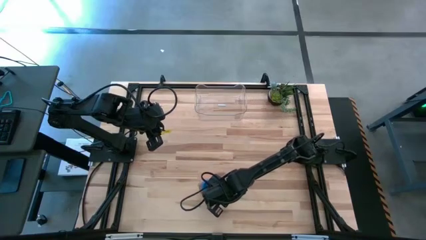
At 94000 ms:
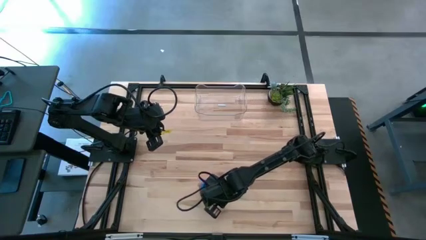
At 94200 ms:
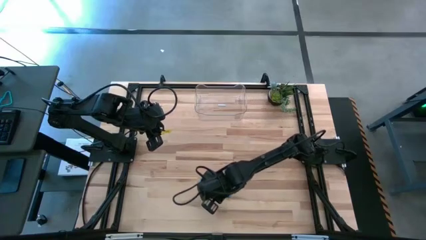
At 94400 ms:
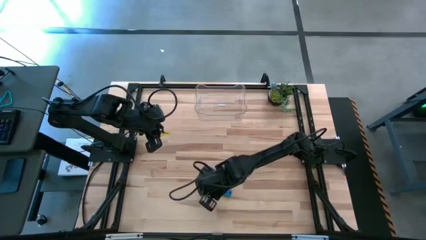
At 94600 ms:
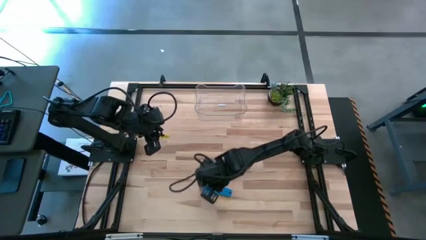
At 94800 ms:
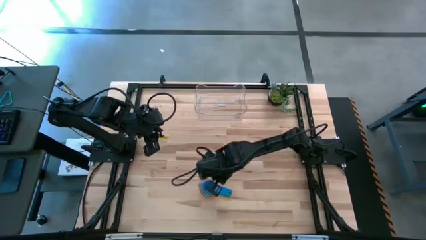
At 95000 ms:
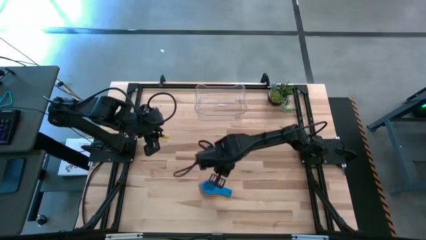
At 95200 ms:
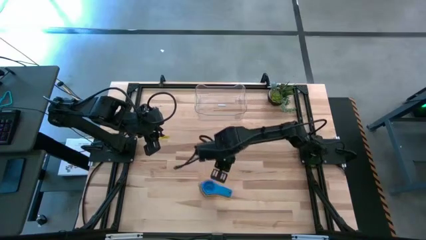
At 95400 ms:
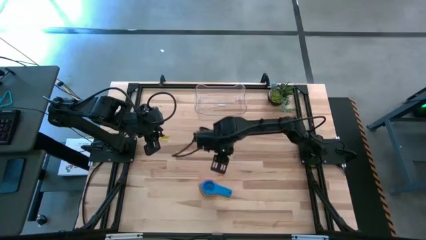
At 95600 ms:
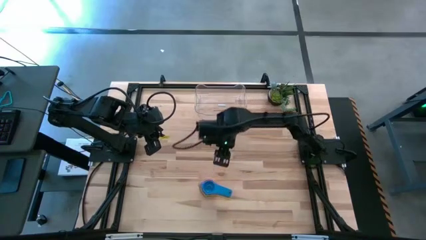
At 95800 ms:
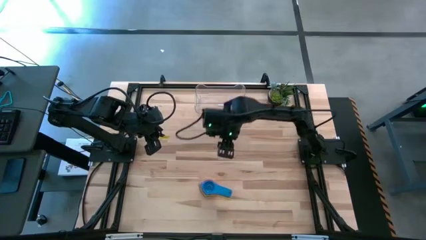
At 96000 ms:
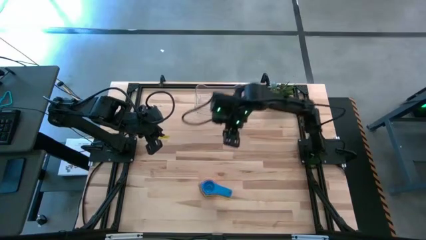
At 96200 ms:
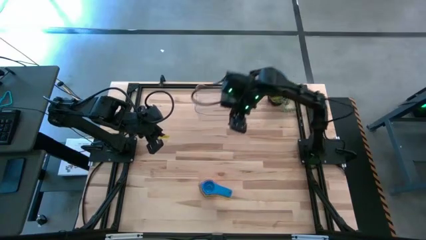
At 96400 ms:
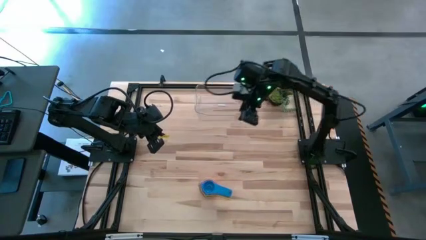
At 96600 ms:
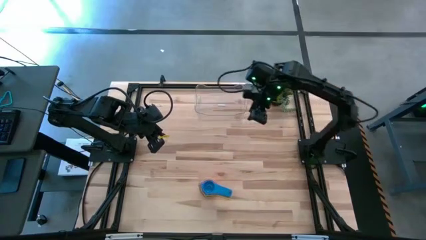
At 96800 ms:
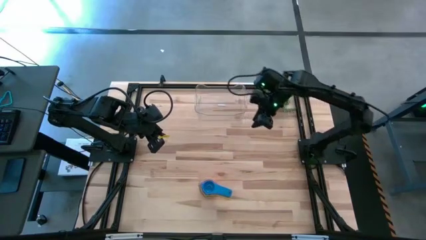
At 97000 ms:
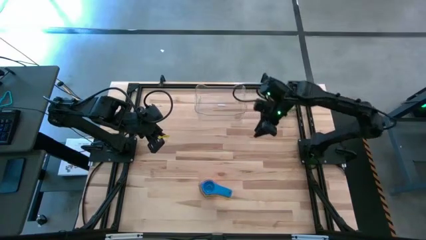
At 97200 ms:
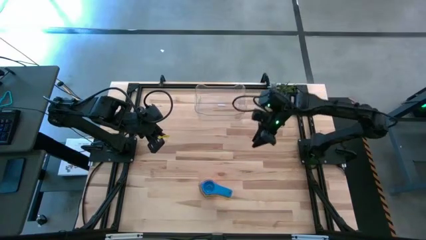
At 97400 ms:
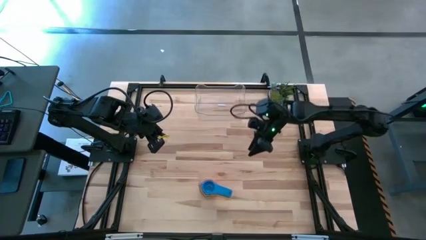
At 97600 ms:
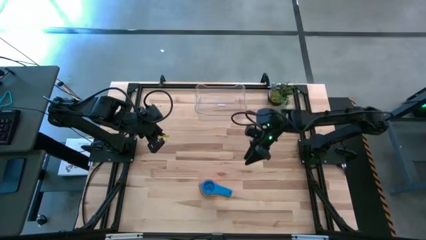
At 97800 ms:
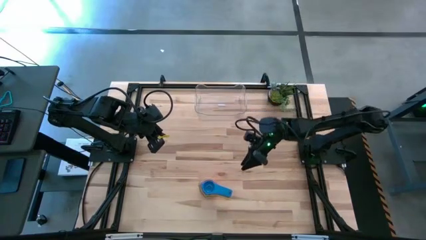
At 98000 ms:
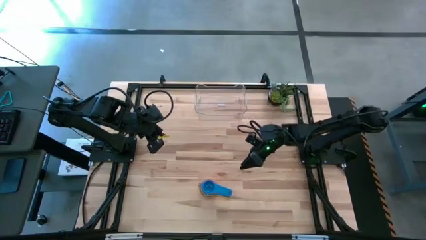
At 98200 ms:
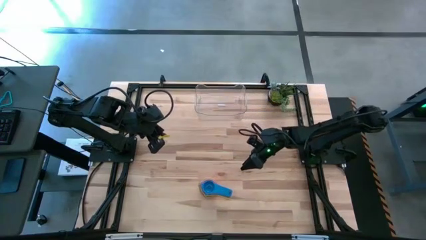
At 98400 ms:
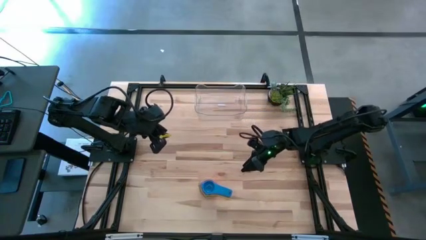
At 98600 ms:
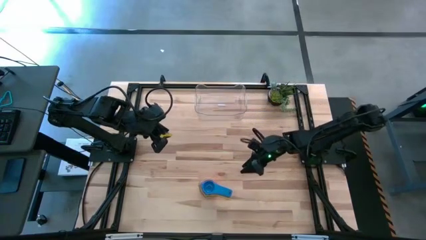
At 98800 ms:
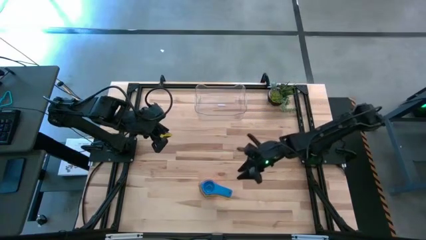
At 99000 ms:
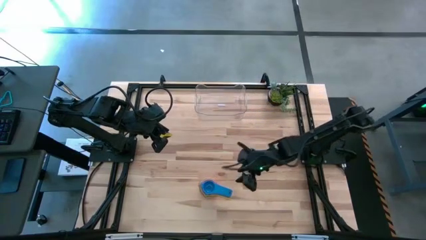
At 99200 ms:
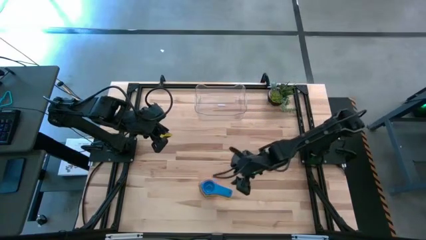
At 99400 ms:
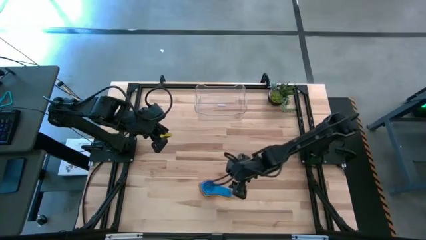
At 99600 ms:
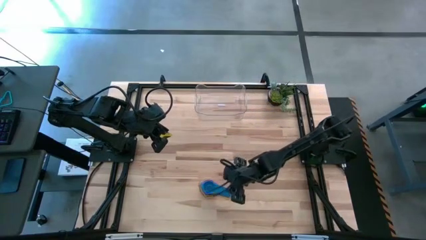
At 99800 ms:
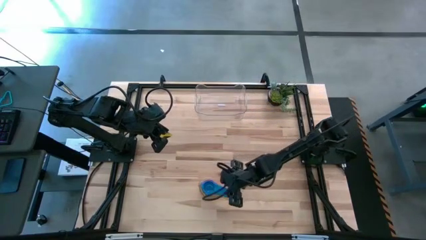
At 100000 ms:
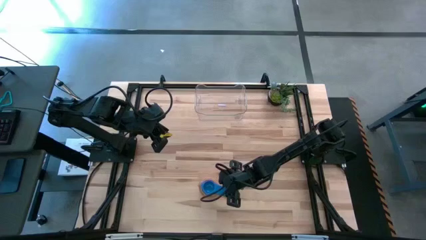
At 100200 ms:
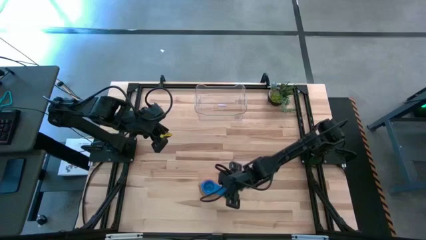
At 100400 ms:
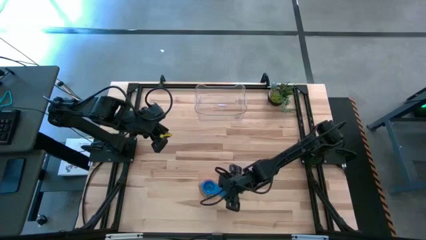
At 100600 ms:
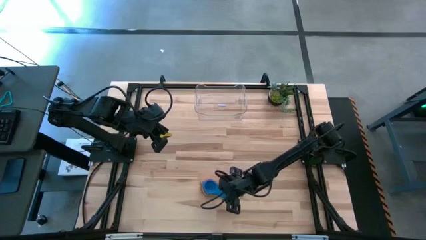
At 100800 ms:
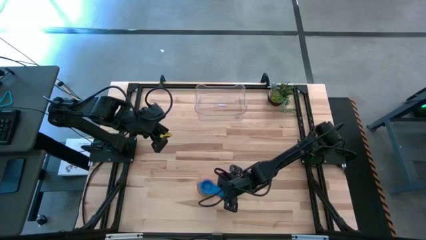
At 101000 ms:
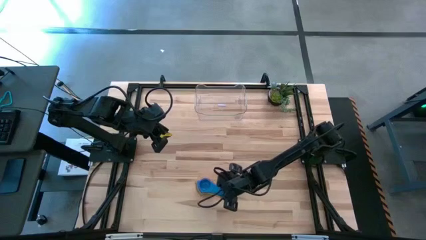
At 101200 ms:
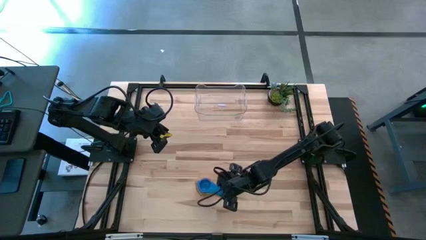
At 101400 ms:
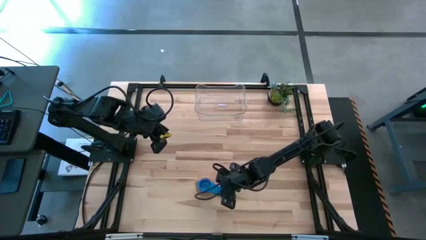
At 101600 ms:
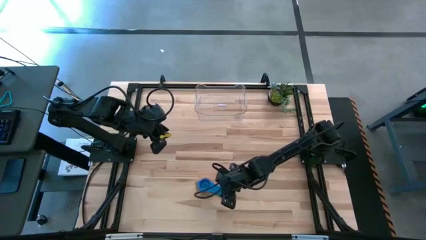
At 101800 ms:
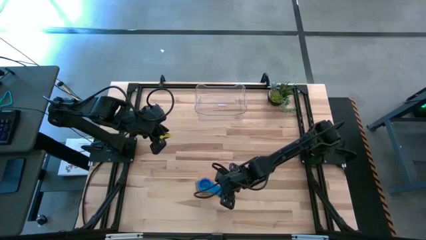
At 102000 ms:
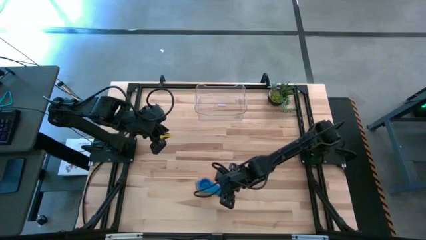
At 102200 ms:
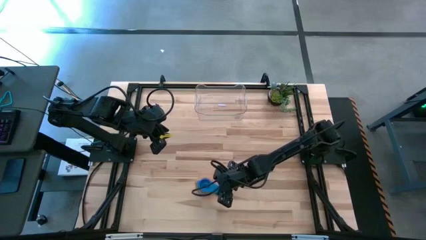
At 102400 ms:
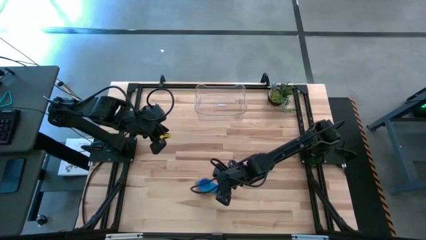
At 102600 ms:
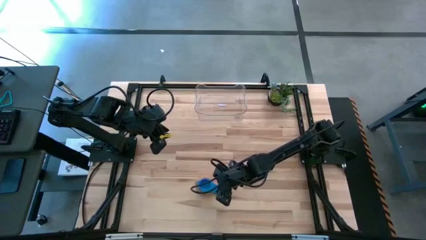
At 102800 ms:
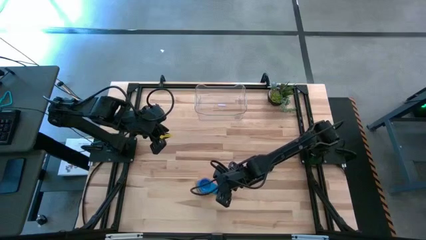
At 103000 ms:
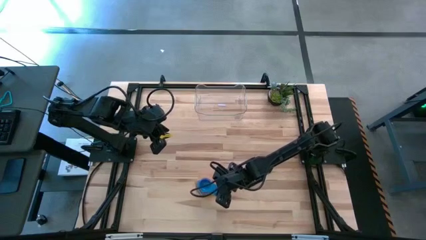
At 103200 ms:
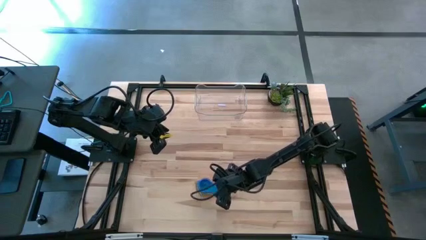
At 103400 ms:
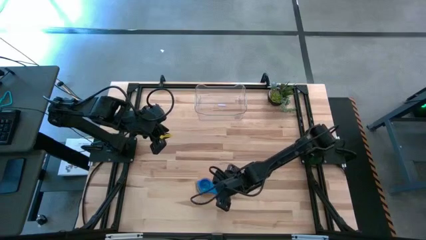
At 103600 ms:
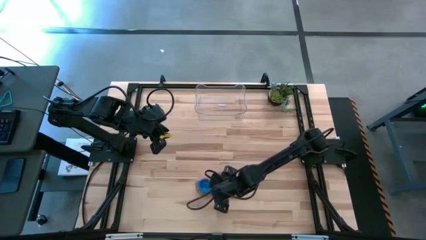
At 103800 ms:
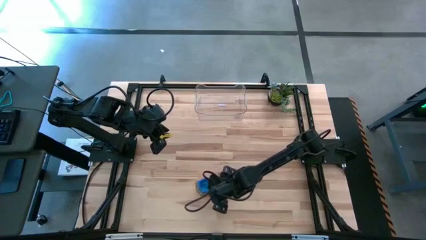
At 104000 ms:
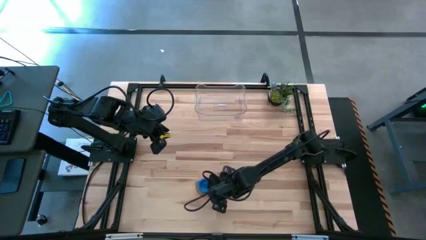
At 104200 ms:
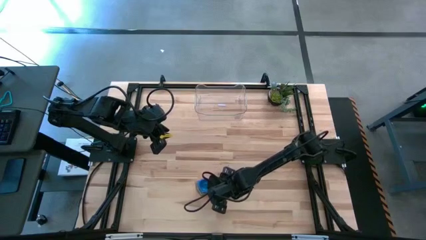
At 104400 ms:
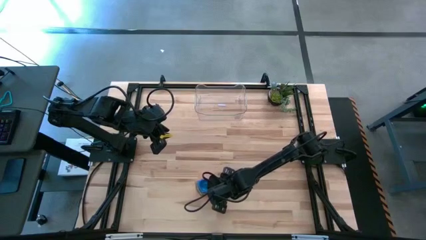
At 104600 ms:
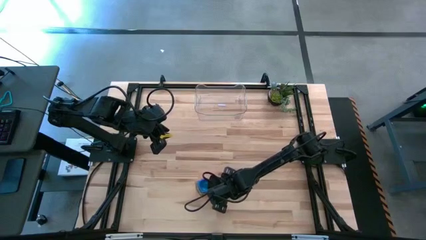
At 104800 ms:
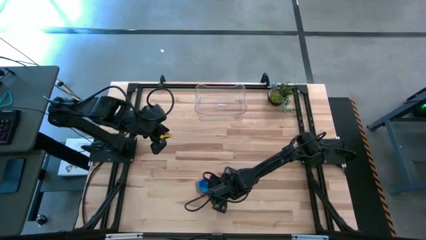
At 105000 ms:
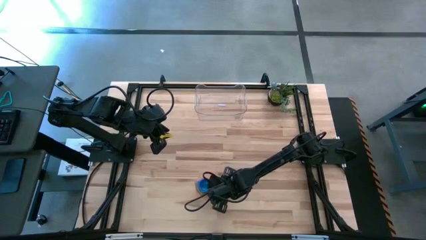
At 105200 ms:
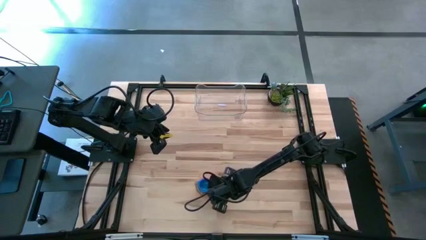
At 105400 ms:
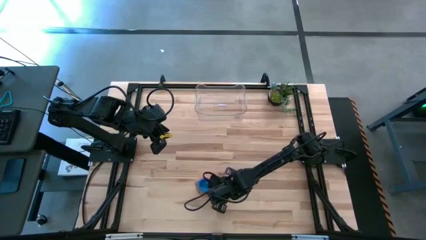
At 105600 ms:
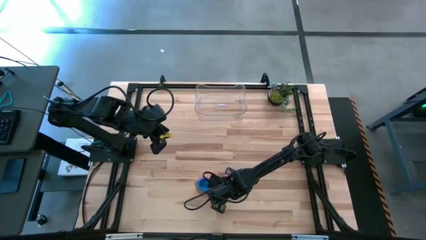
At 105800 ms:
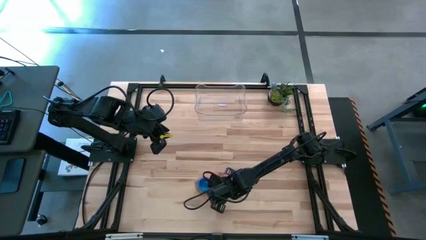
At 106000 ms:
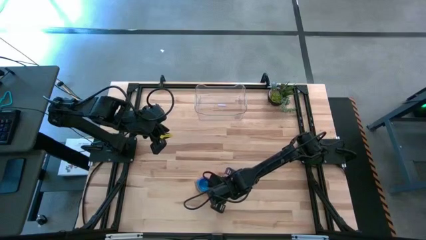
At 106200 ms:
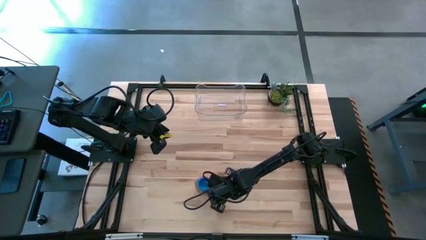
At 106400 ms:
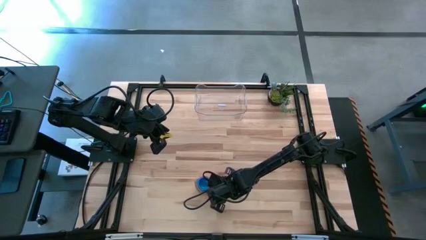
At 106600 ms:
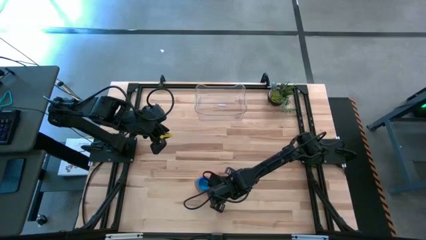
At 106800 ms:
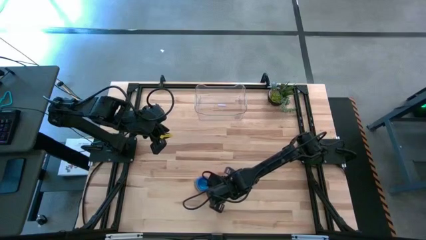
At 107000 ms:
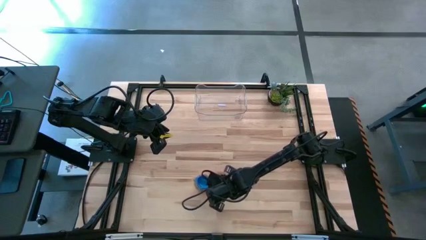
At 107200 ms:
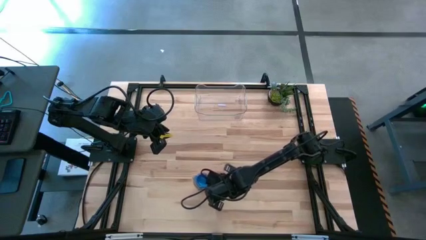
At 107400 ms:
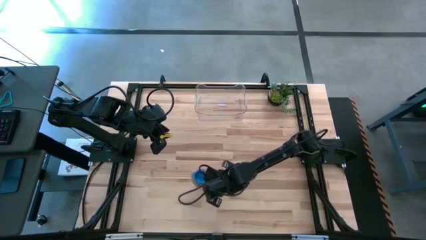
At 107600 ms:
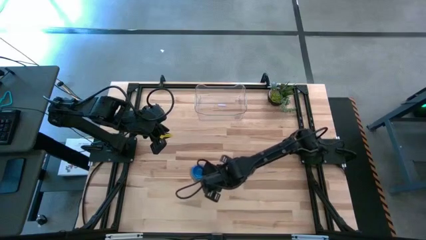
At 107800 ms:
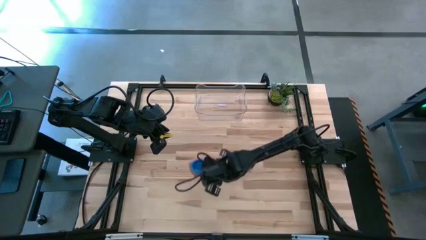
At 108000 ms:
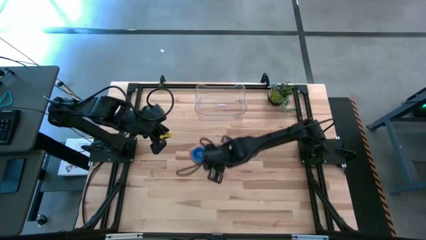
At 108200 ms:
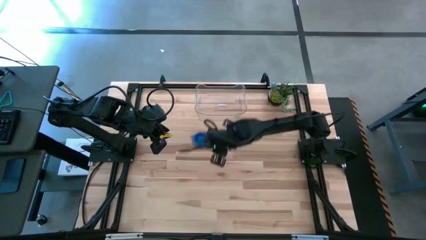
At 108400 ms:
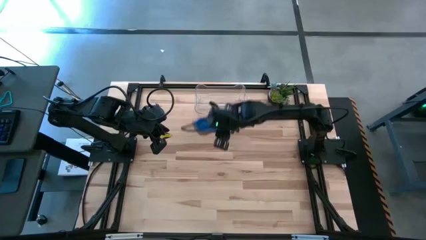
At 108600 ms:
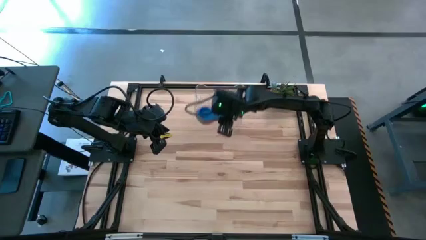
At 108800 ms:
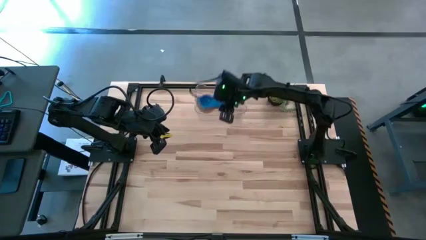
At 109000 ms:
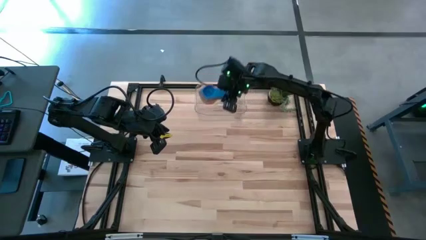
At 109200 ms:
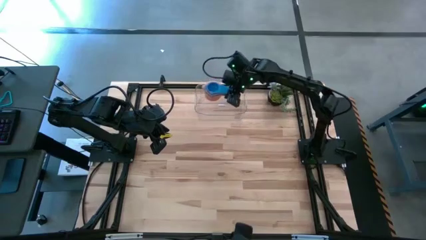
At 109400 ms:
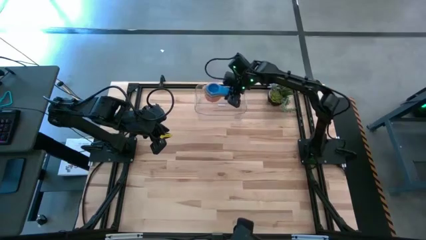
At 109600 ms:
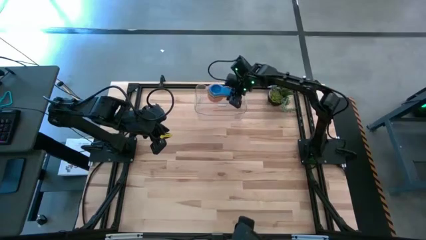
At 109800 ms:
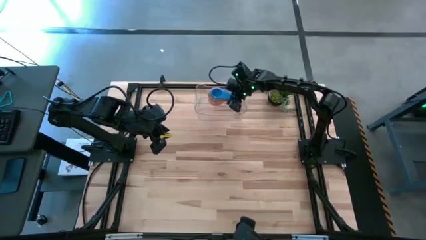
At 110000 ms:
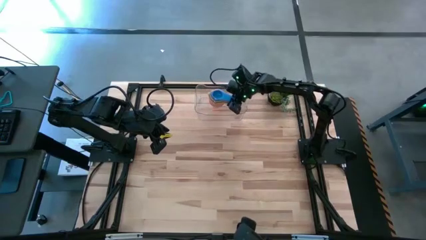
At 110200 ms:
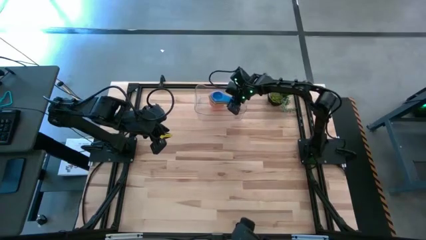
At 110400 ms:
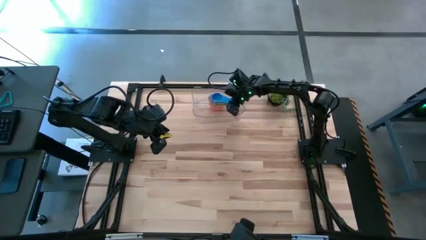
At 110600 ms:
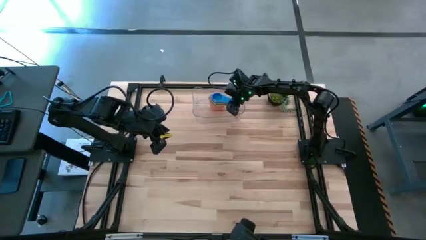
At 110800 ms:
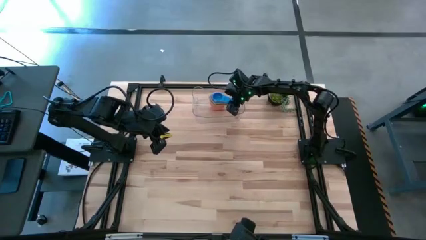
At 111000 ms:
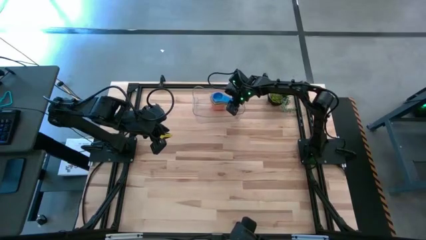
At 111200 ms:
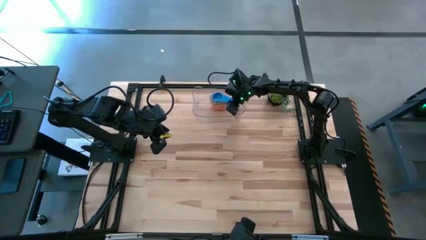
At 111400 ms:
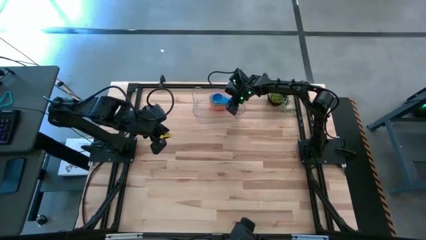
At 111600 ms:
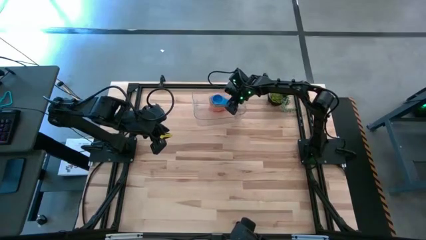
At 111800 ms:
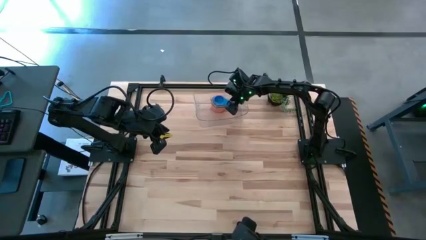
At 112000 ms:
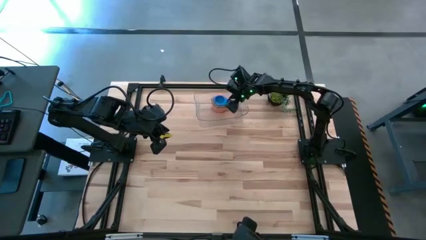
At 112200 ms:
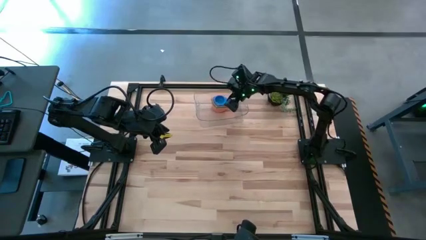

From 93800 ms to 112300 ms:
Task: Nest measuring cups in basket
Put the nest measuring cups into the transparent bin
